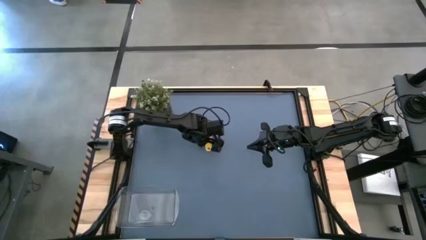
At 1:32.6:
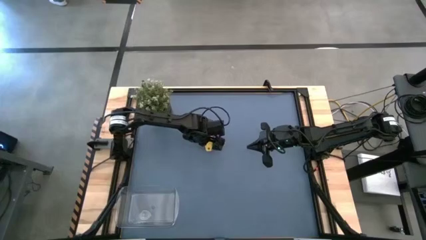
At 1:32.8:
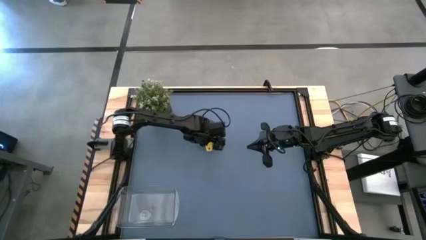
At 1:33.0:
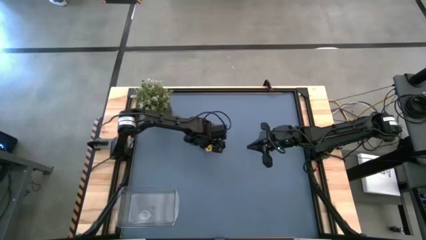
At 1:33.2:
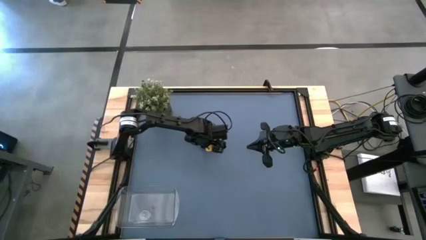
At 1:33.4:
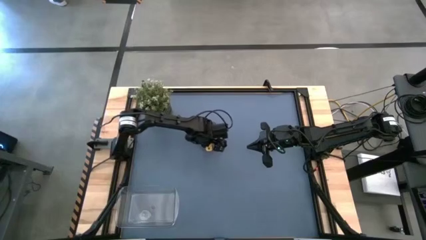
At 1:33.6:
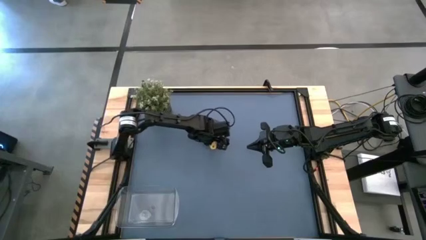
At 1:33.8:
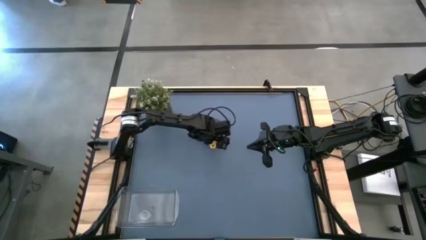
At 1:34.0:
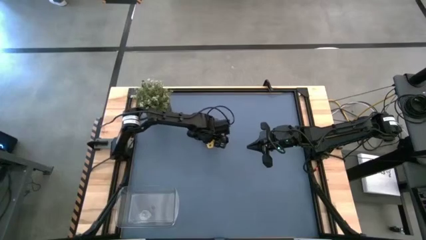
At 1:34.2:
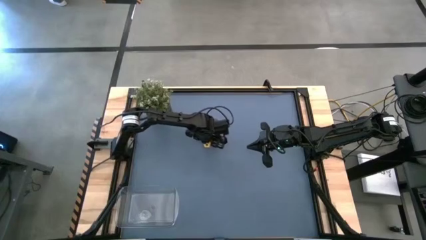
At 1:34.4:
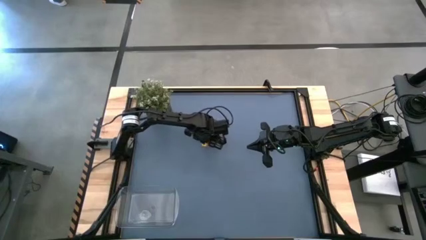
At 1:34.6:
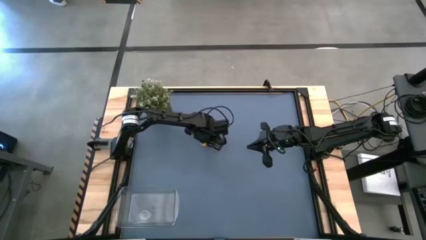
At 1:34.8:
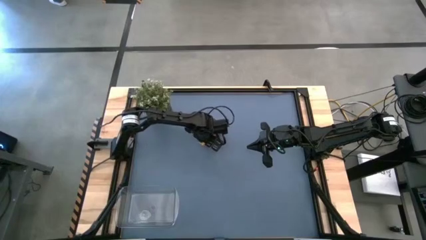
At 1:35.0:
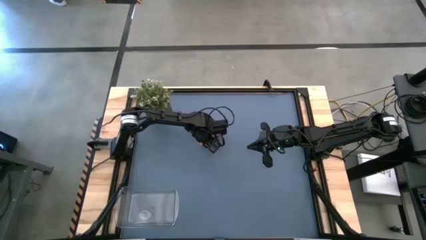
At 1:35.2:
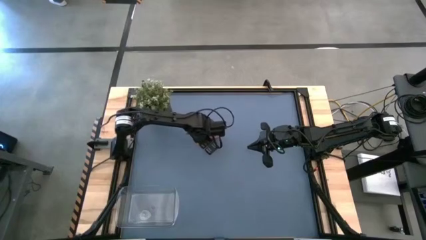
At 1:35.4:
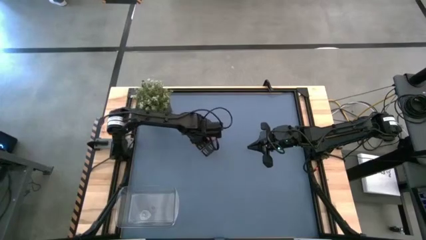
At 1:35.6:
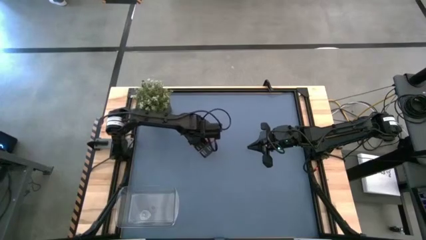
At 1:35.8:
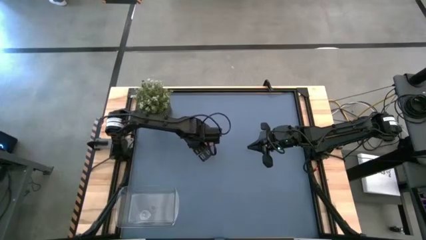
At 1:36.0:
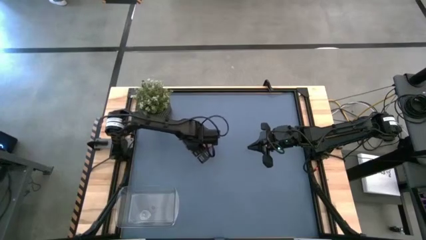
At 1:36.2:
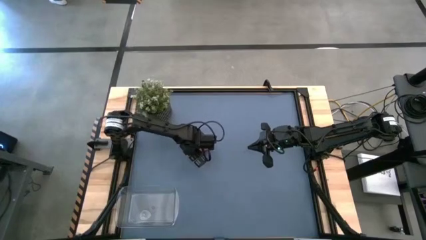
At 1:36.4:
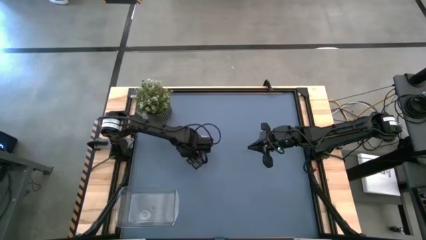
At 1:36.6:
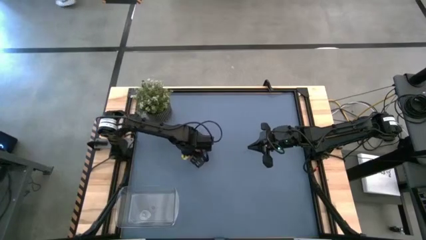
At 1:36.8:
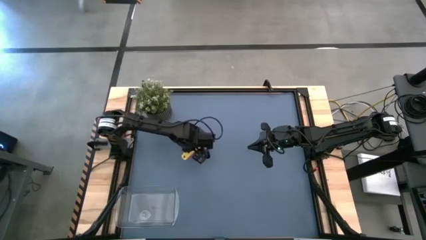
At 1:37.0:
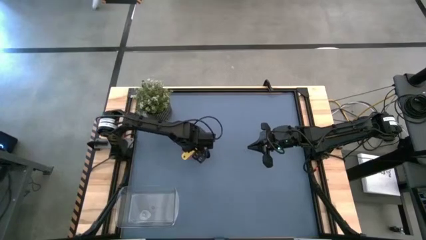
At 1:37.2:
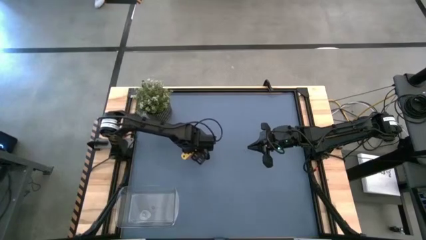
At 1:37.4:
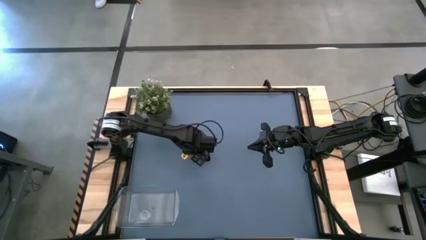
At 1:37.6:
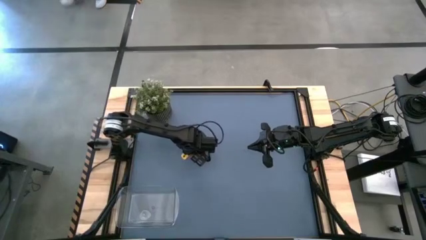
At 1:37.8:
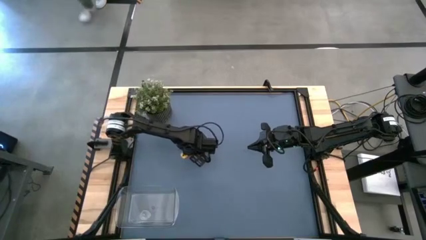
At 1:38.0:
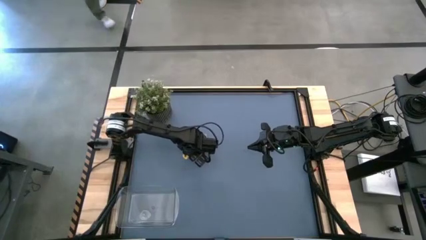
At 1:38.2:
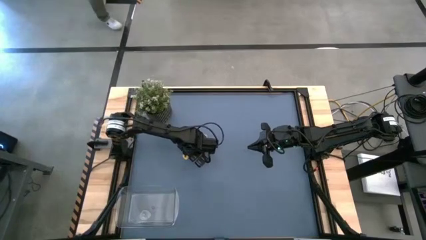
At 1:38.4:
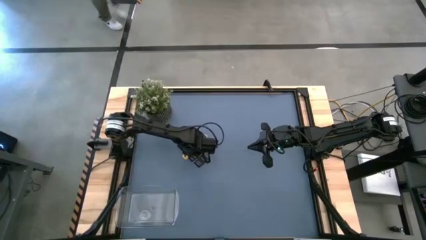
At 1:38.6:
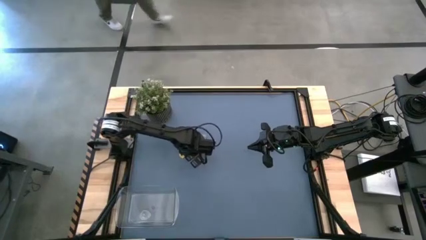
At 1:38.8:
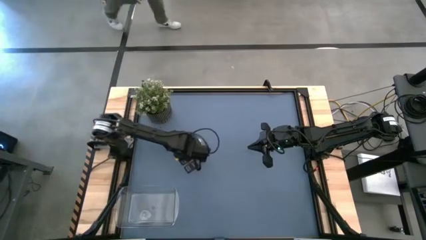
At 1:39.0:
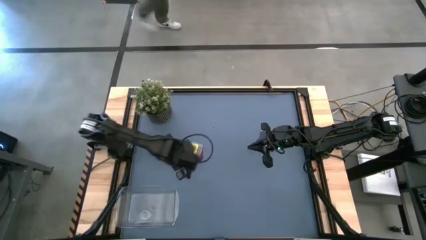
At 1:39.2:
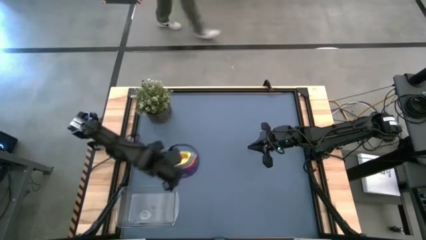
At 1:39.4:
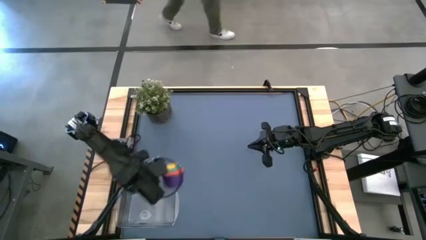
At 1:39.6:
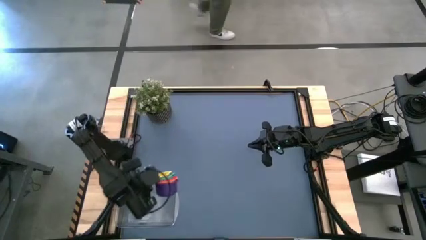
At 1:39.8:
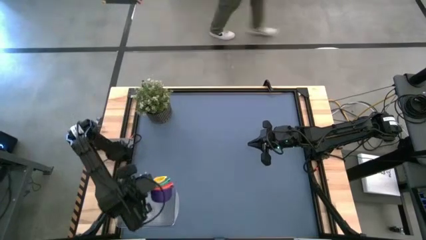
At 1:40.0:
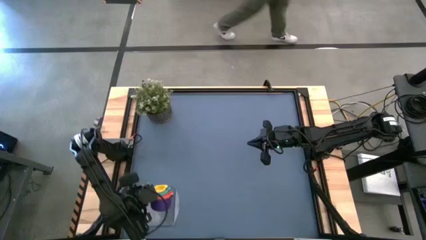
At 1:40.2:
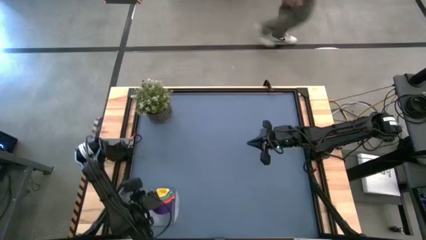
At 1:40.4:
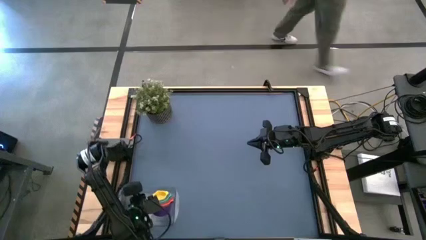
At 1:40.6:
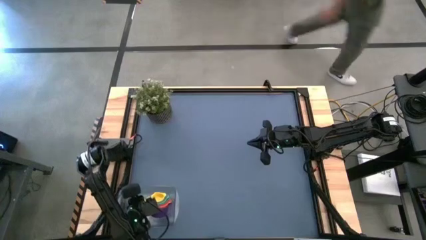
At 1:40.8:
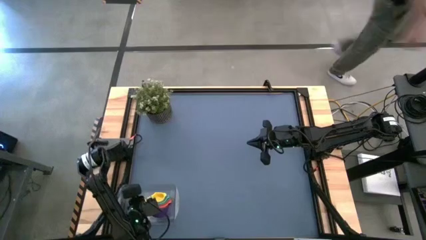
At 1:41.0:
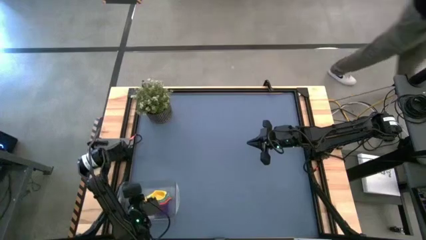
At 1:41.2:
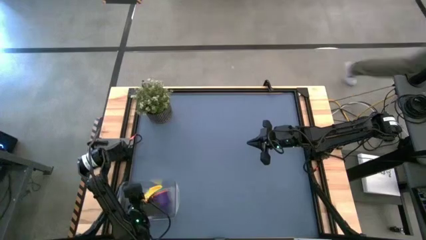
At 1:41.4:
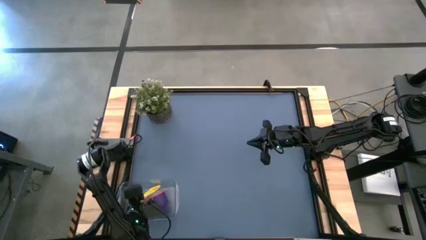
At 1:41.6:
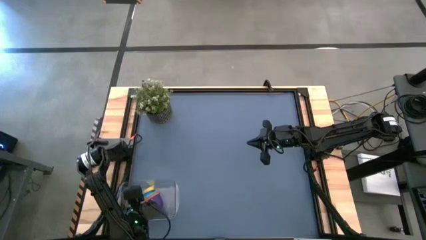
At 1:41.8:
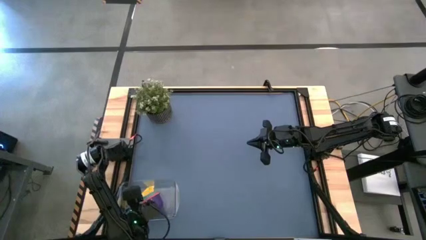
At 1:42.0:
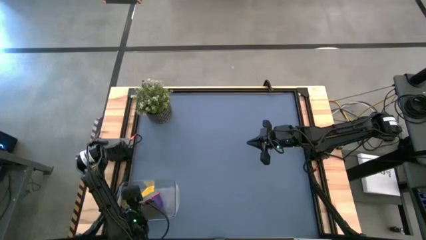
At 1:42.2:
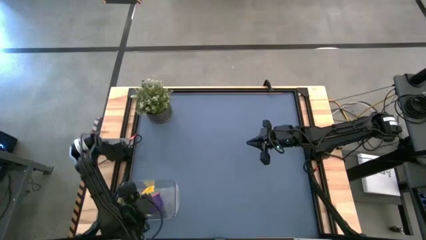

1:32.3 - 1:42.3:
Task: Nest measuring cups in basket
Put the stacked measuring cups into the transparent bin
